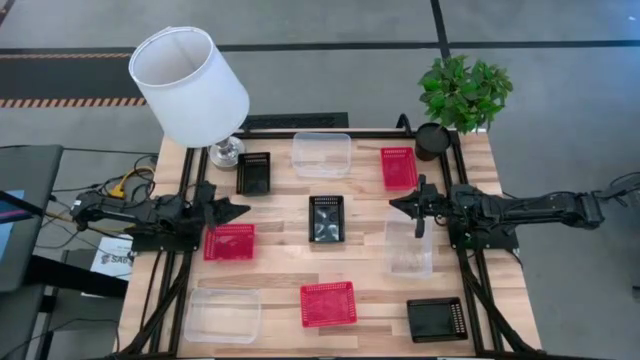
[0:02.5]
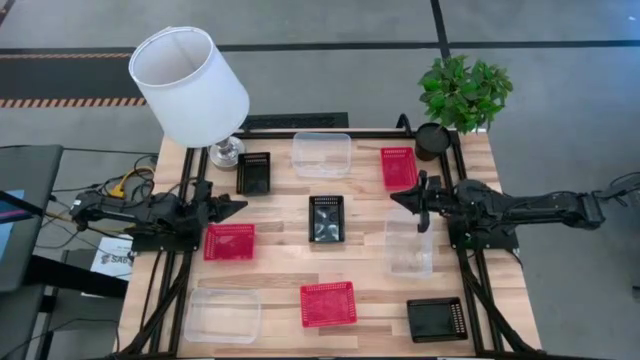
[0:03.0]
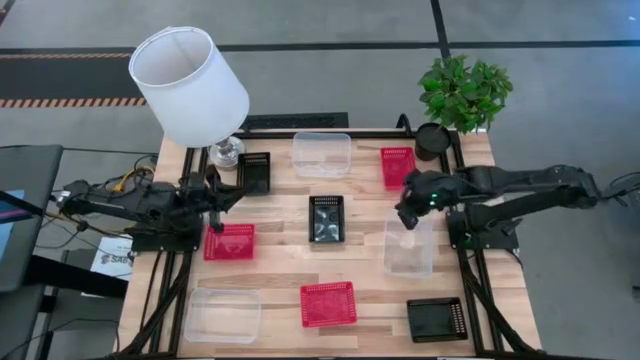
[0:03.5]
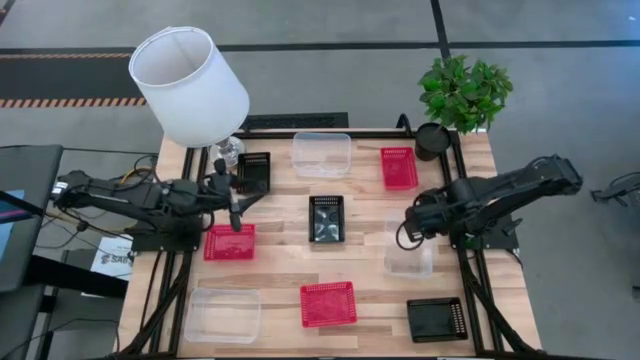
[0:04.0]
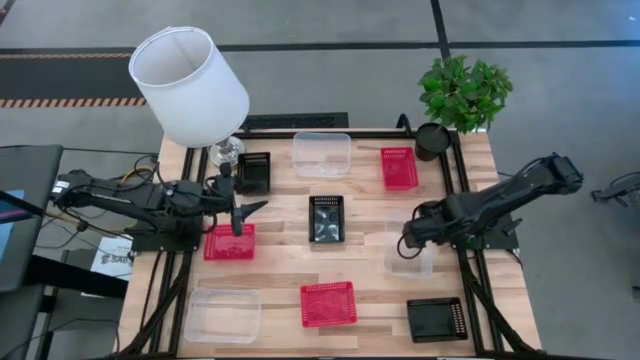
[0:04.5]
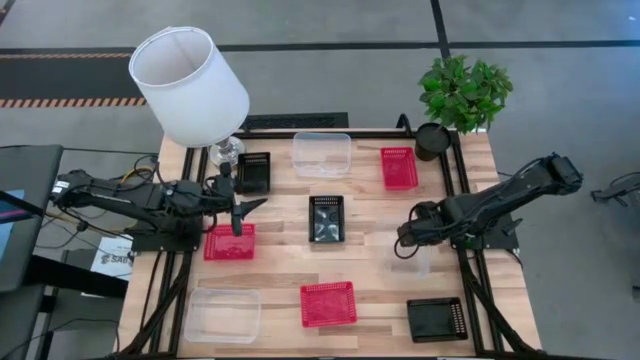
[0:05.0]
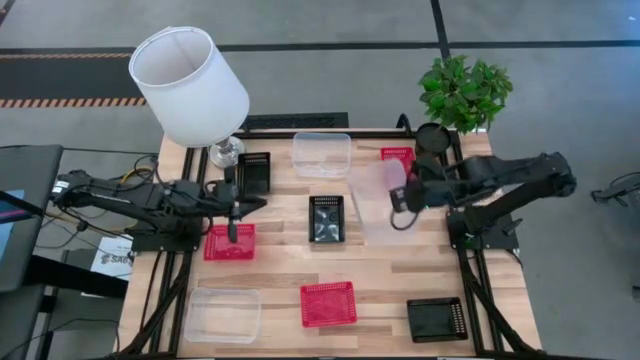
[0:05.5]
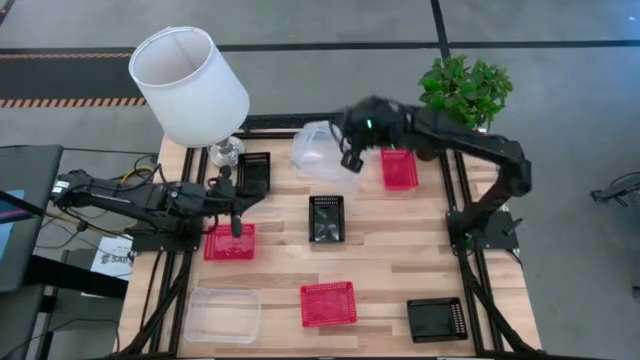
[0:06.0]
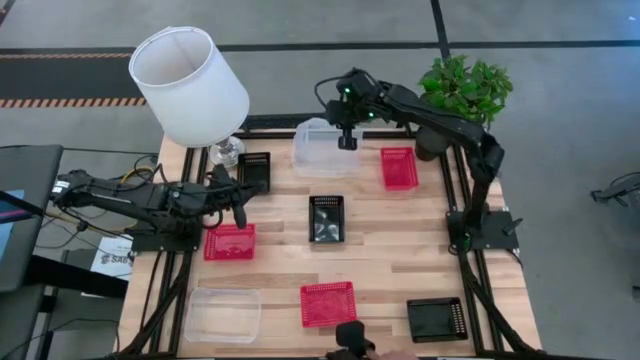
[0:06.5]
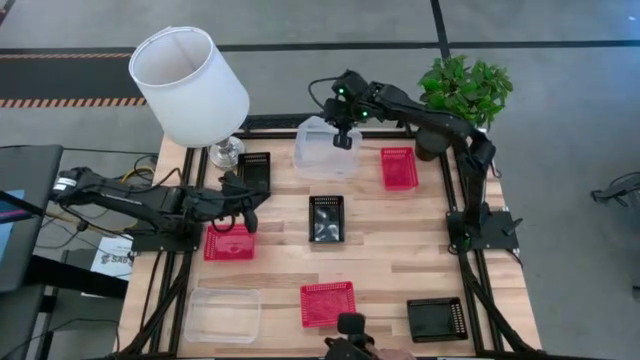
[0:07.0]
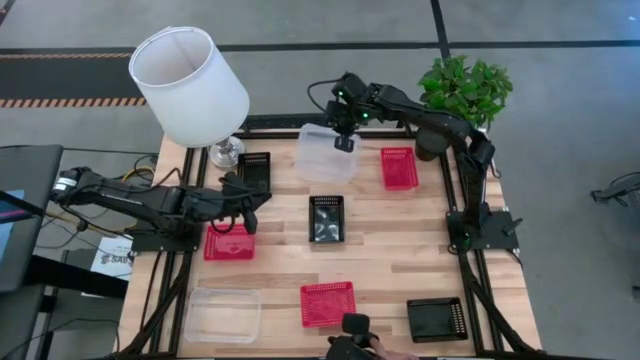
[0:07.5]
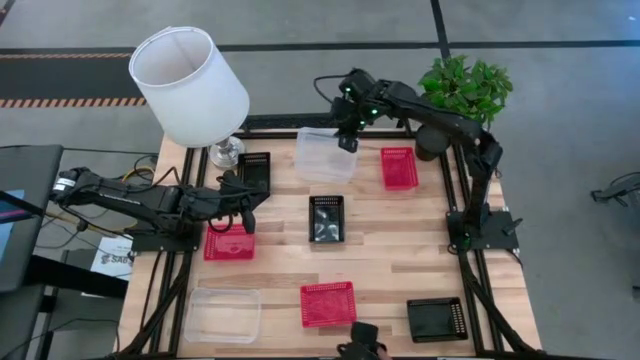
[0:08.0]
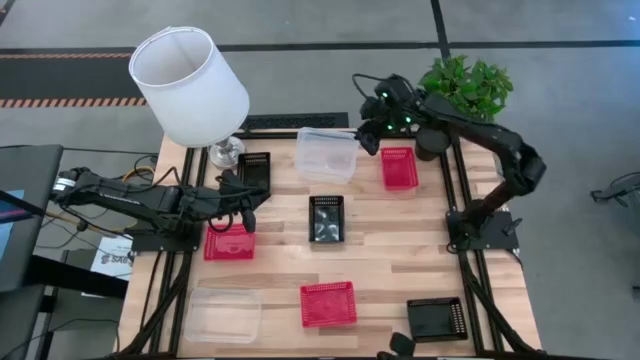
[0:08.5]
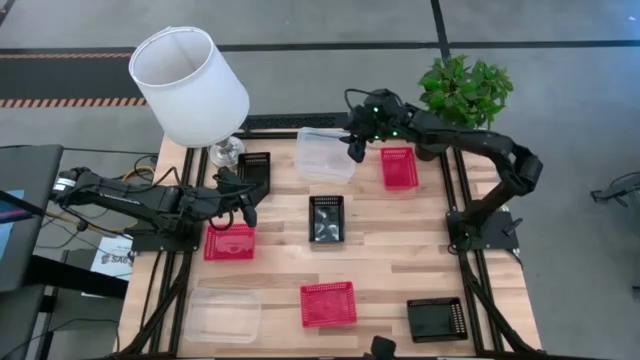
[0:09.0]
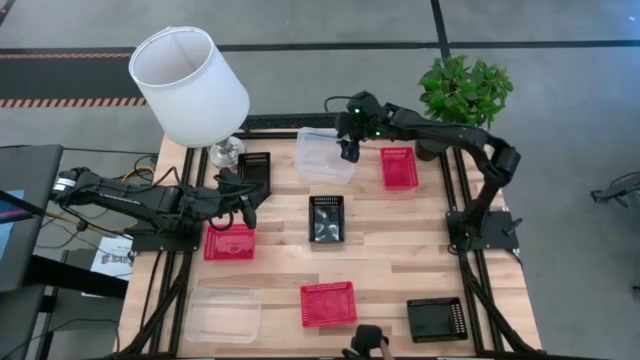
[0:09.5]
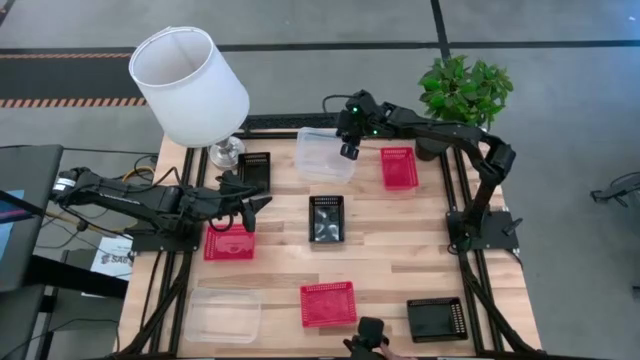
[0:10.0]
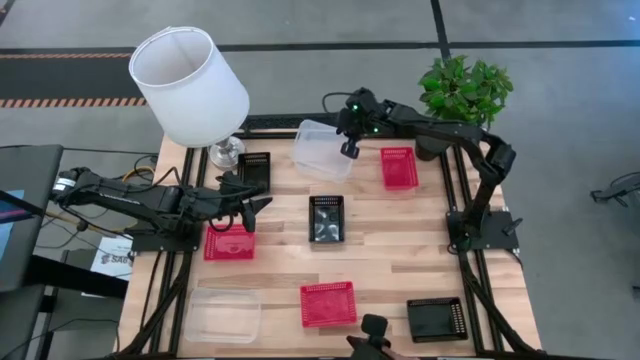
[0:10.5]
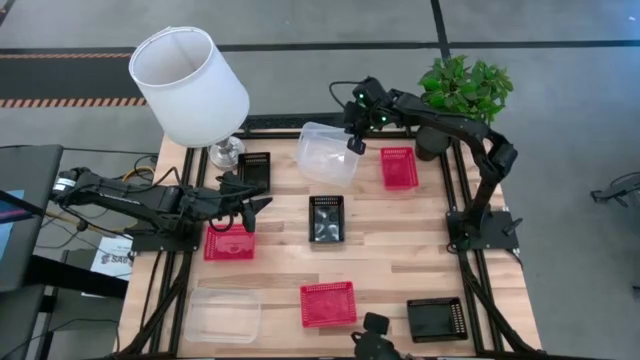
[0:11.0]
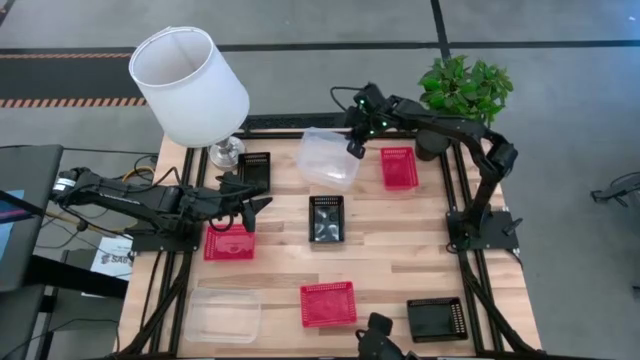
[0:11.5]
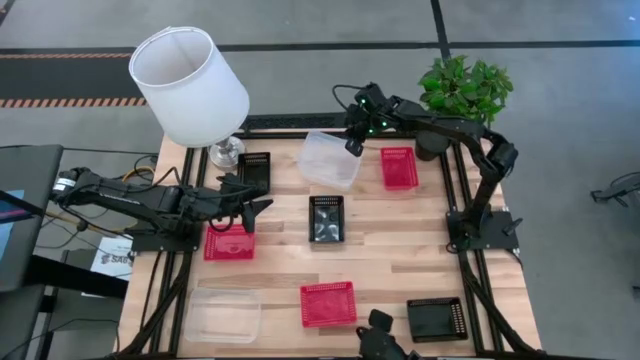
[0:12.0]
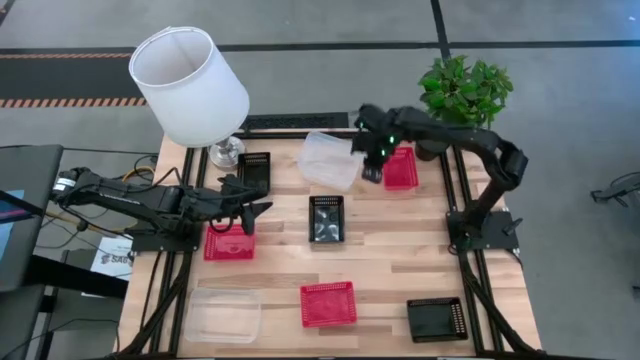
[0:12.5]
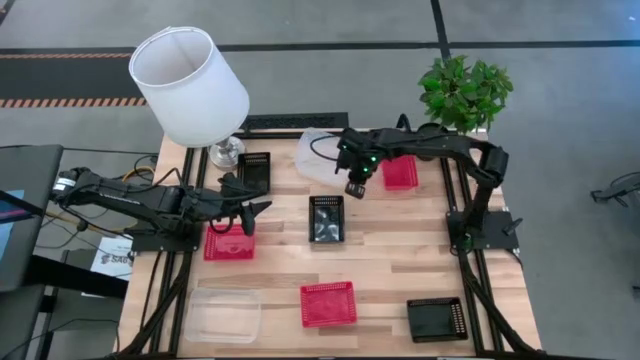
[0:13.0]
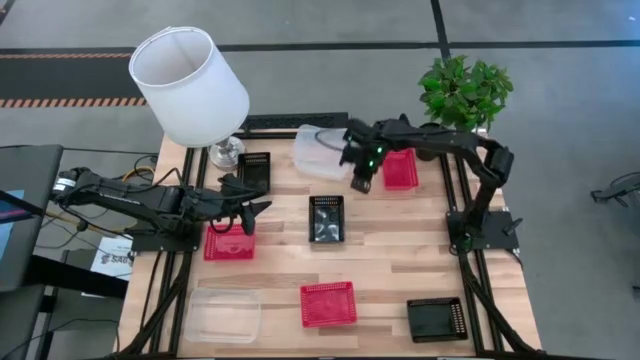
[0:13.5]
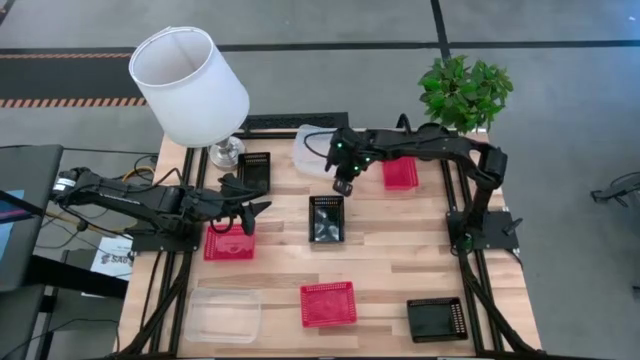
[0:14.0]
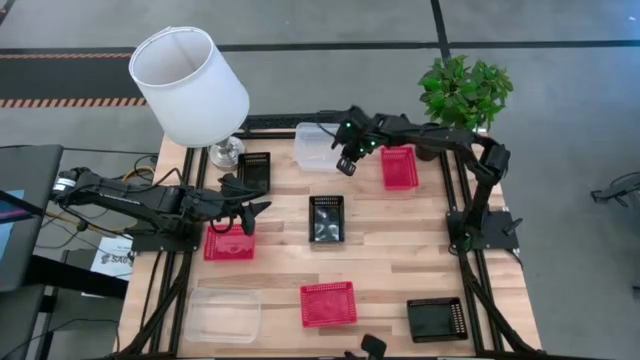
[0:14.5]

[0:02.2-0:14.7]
Stack the middle transparent bin on the top transparent bin

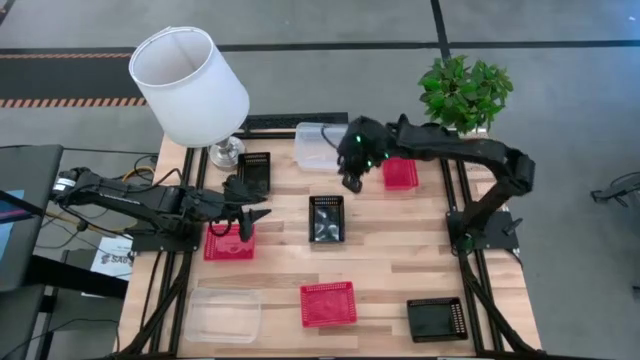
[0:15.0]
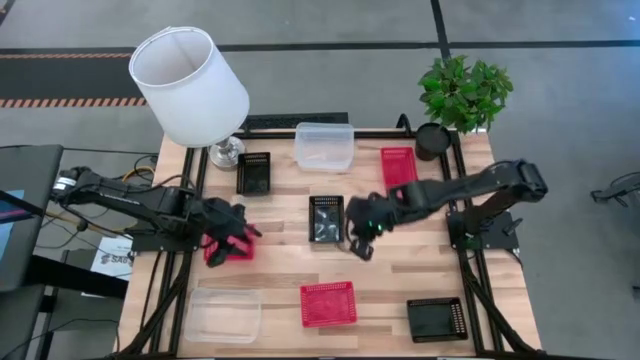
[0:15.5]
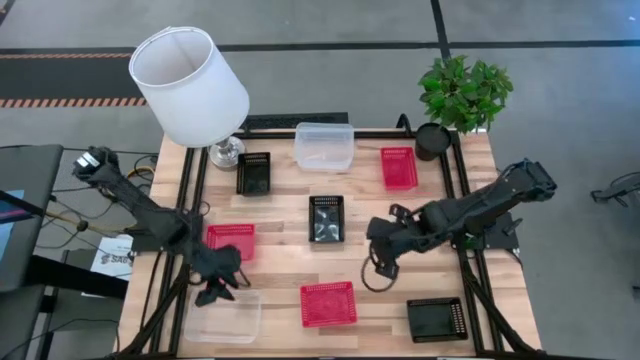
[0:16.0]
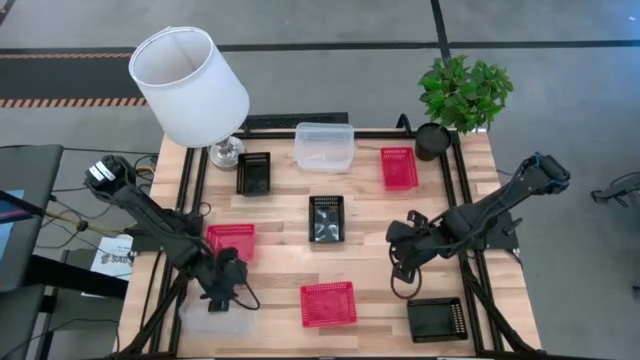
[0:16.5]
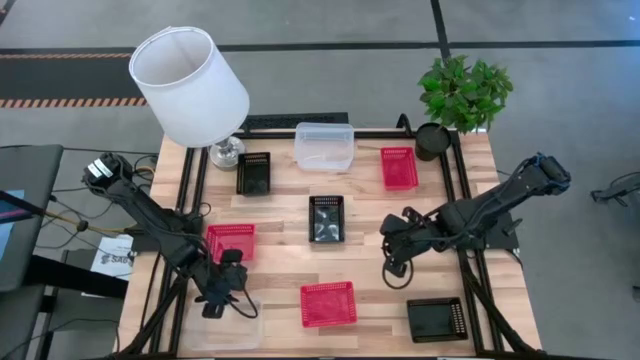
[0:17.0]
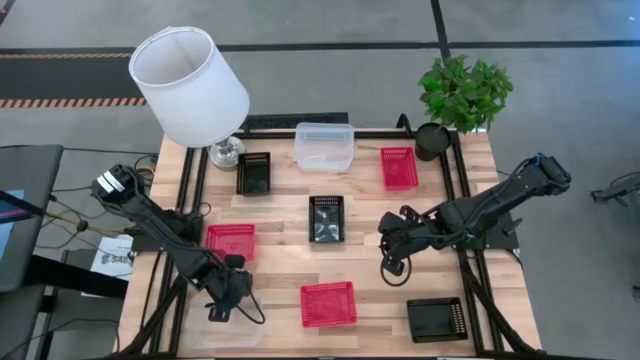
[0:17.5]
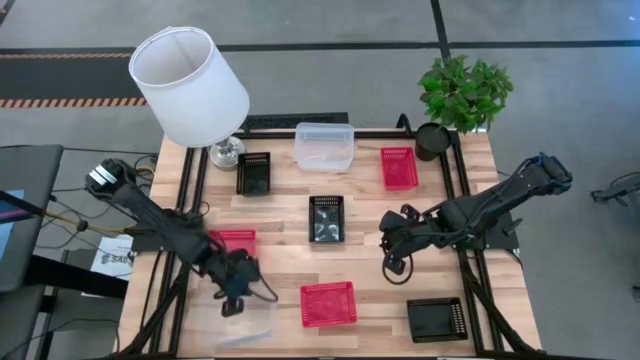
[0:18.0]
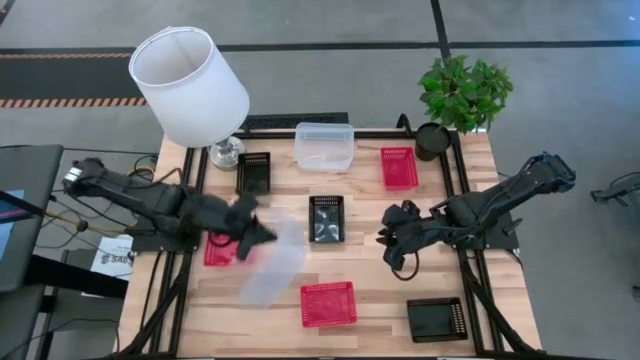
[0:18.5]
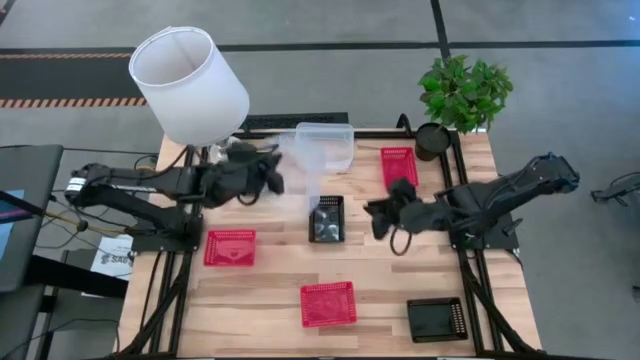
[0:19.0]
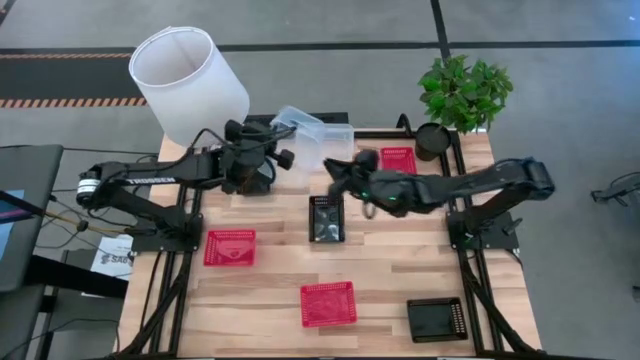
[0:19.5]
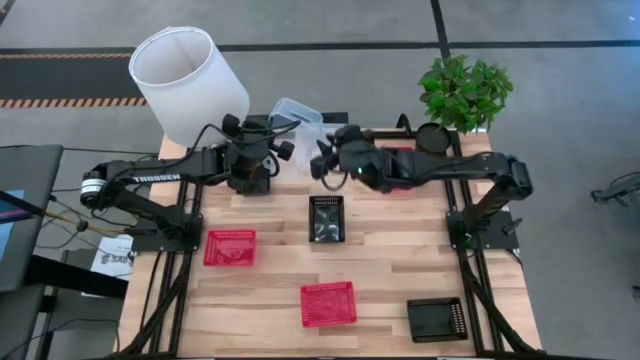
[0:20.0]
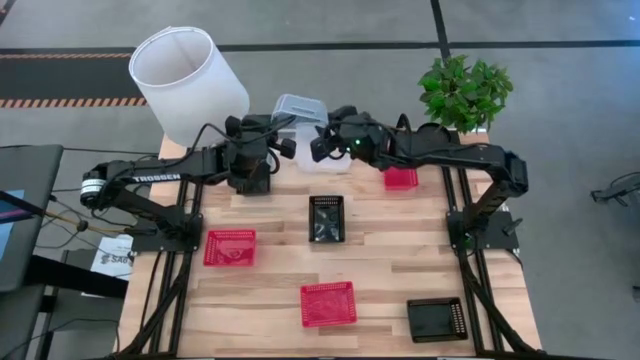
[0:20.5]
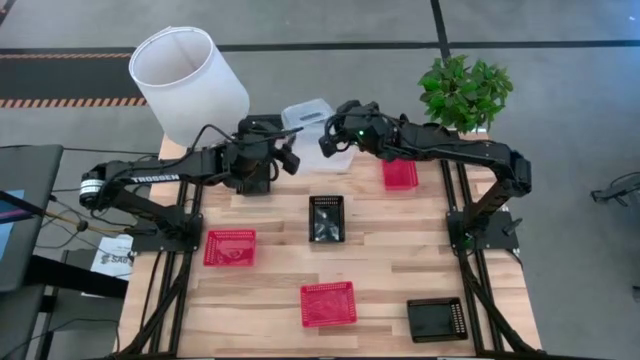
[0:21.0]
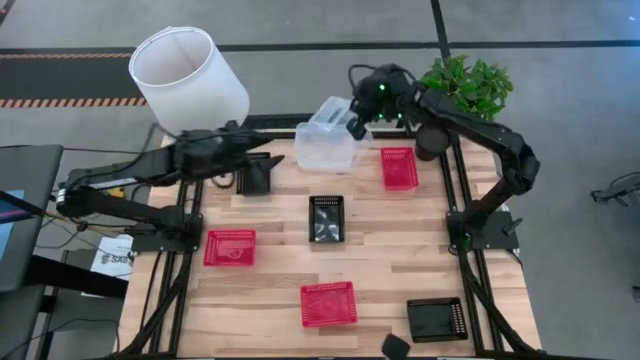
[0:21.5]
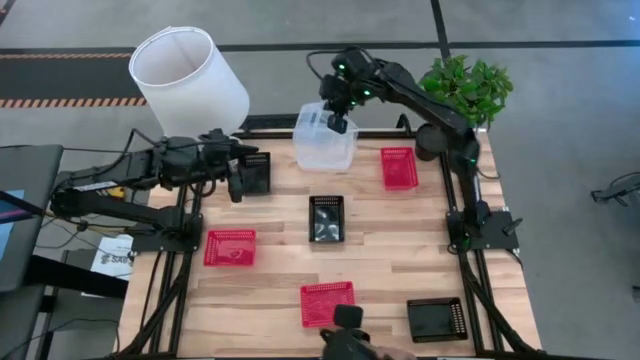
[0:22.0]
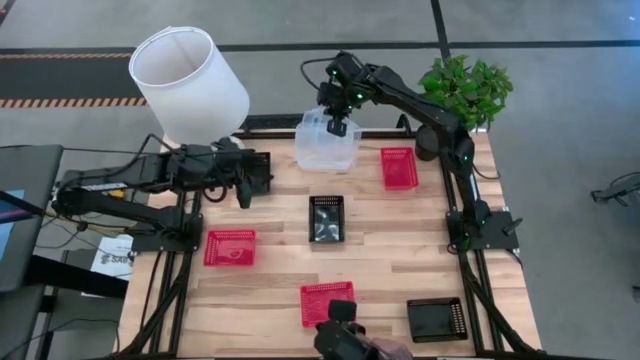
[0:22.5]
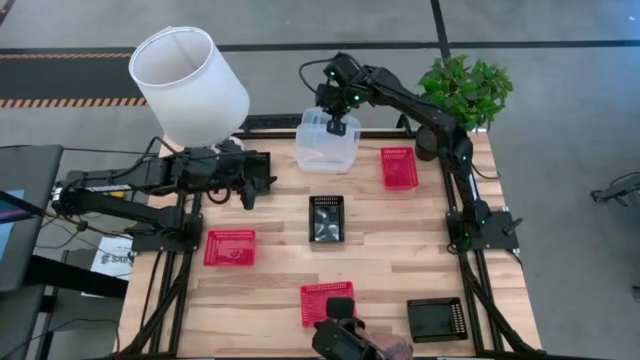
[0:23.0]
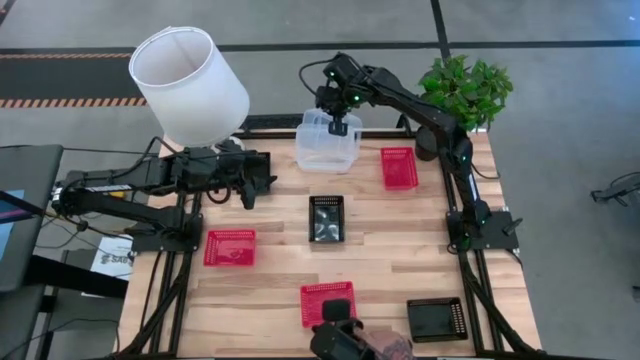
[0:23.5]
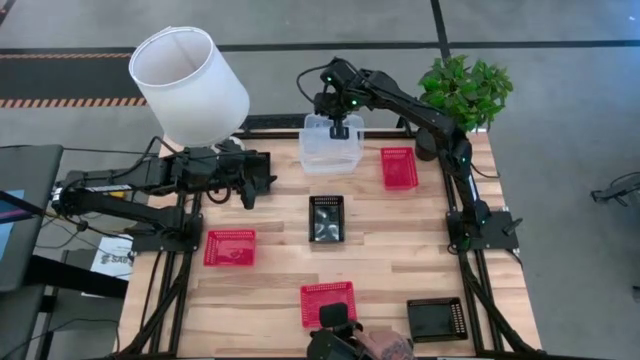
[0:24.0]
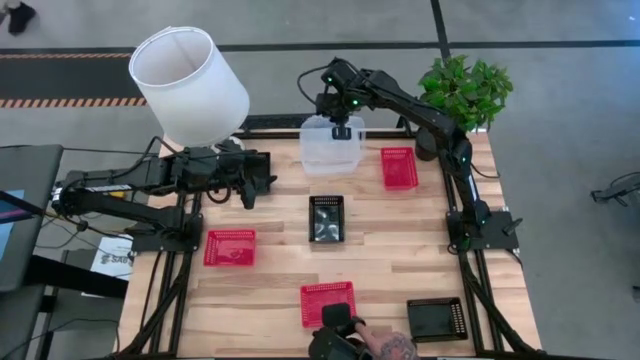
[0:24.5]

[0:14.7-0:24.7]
Stack the bottom transparent bin on the transparent bin
